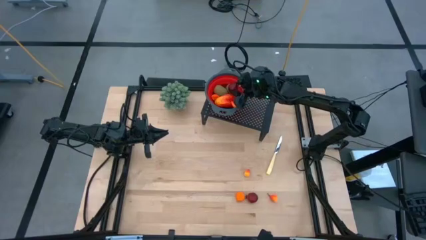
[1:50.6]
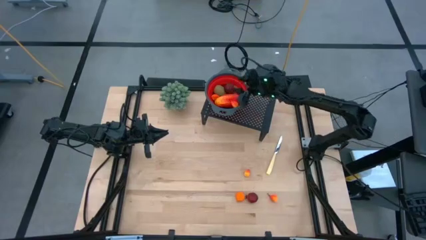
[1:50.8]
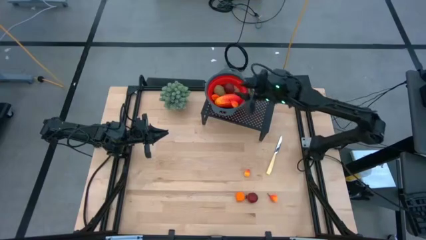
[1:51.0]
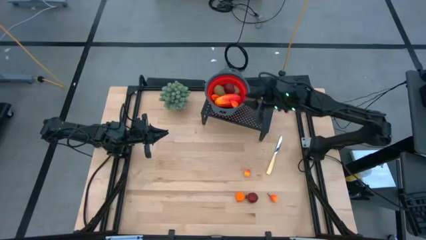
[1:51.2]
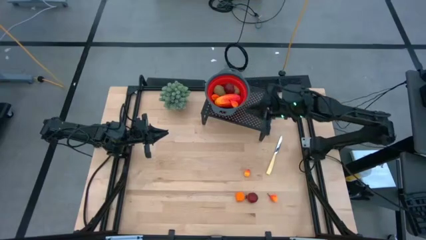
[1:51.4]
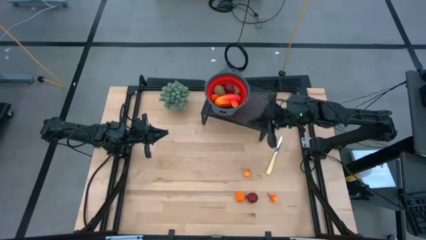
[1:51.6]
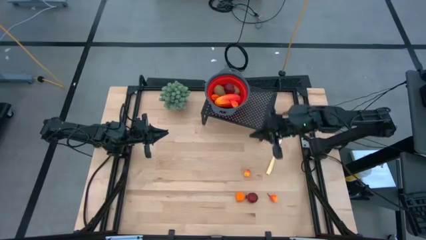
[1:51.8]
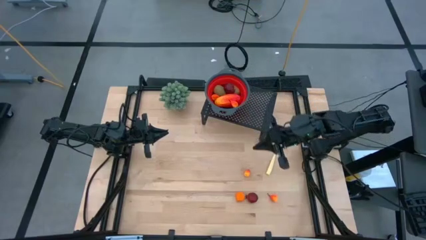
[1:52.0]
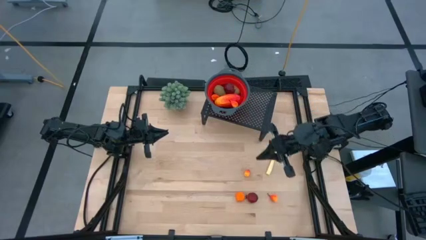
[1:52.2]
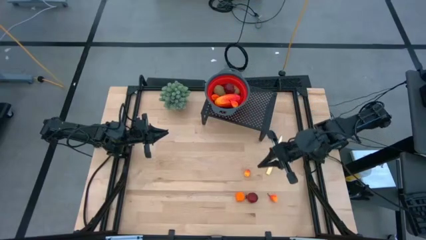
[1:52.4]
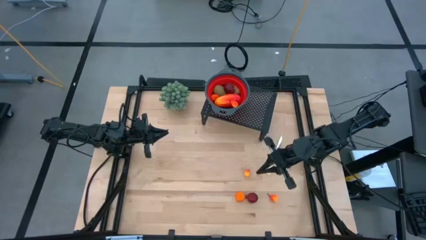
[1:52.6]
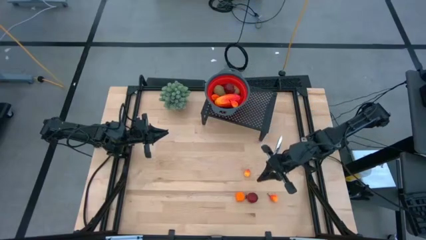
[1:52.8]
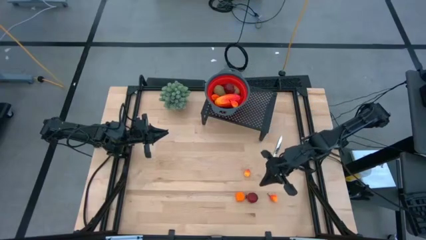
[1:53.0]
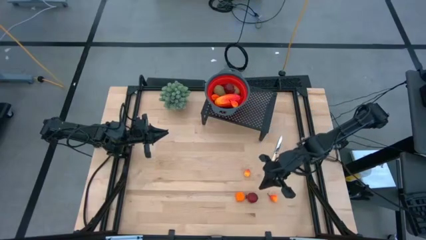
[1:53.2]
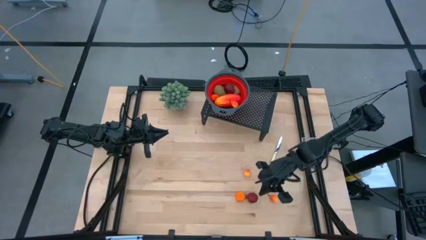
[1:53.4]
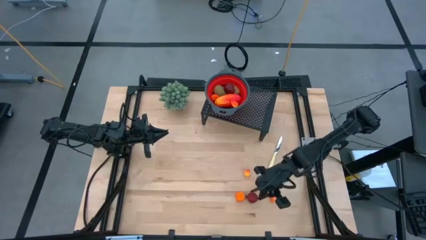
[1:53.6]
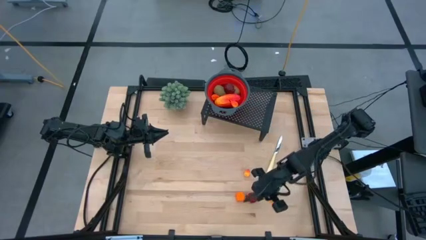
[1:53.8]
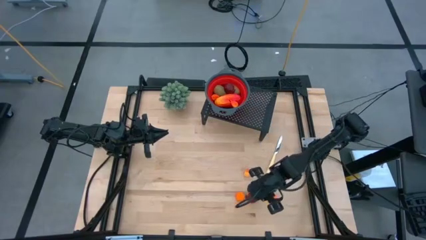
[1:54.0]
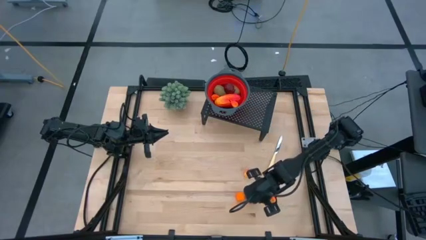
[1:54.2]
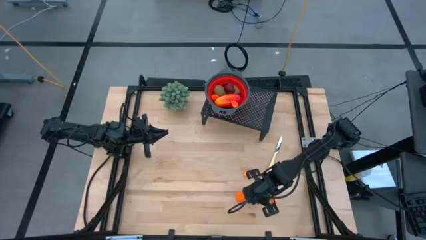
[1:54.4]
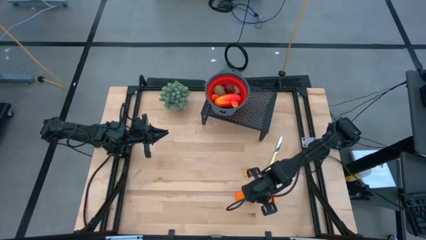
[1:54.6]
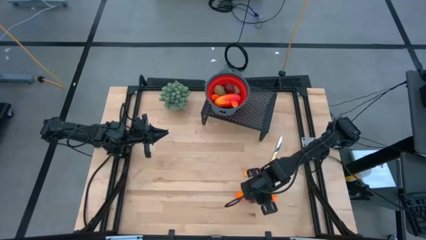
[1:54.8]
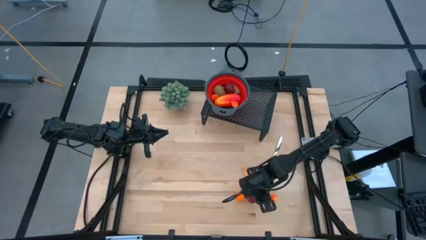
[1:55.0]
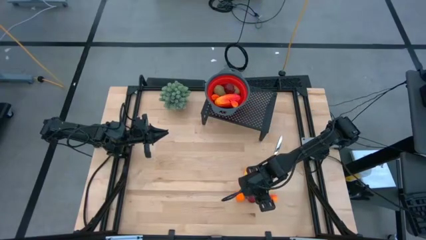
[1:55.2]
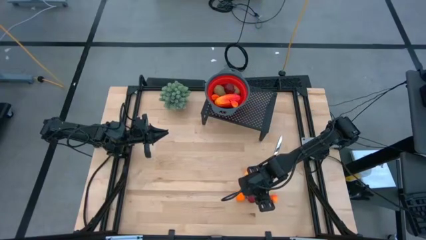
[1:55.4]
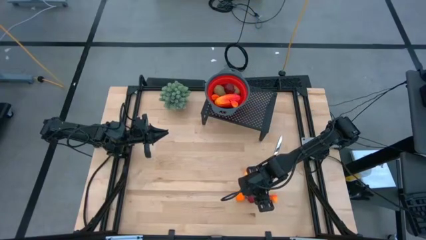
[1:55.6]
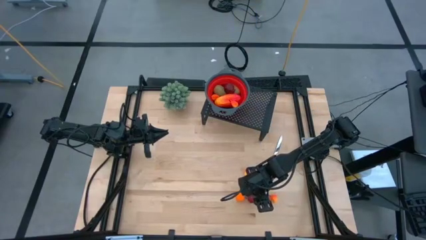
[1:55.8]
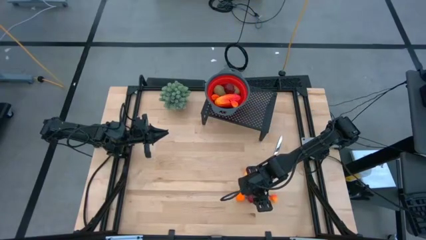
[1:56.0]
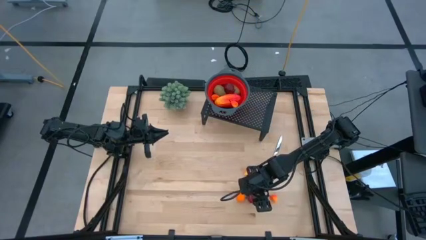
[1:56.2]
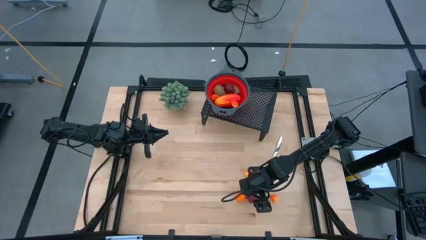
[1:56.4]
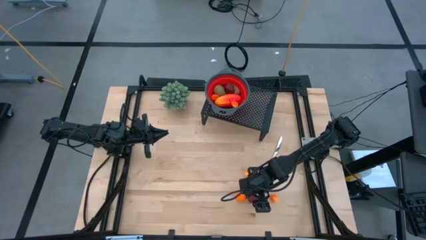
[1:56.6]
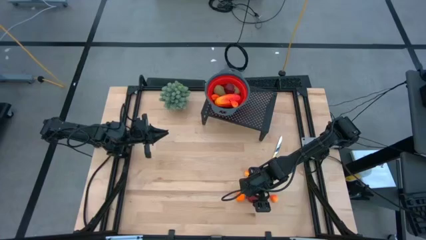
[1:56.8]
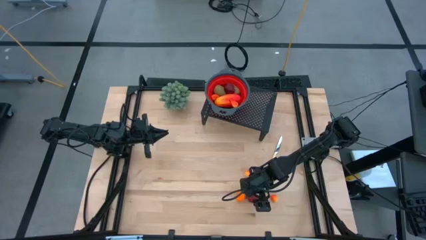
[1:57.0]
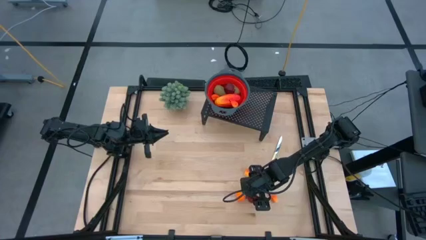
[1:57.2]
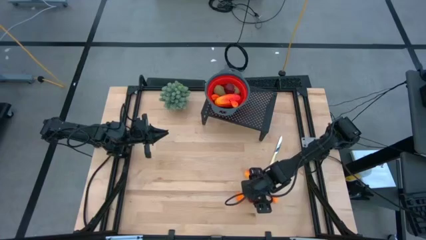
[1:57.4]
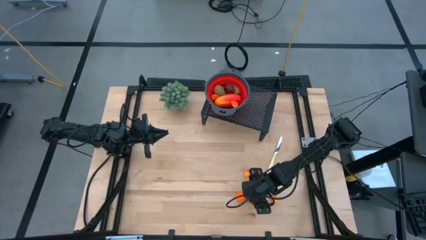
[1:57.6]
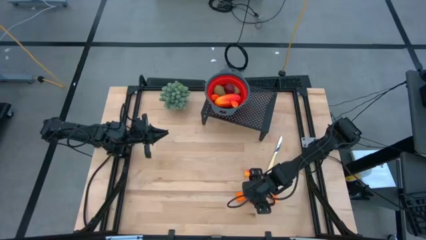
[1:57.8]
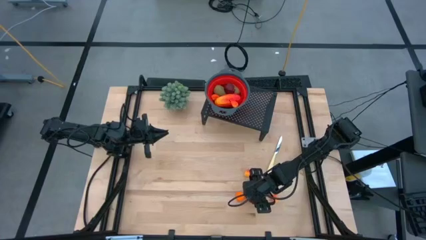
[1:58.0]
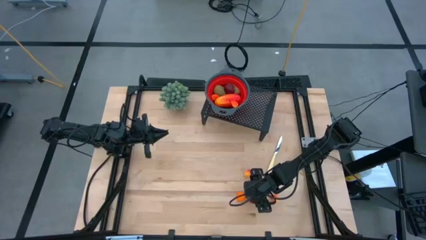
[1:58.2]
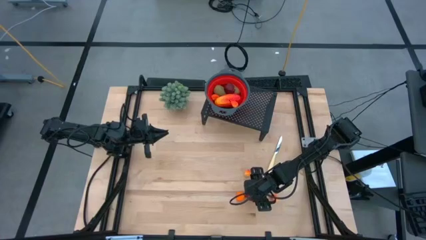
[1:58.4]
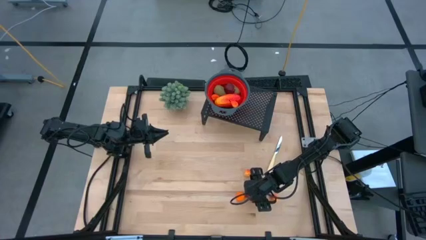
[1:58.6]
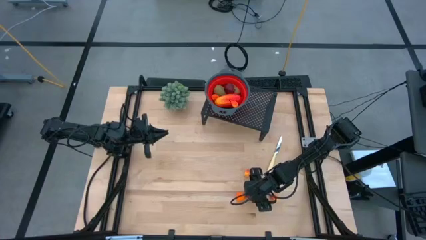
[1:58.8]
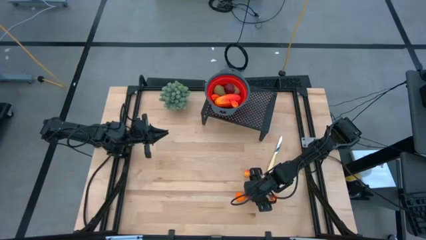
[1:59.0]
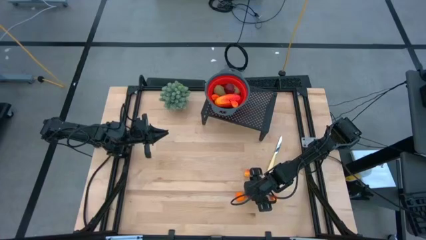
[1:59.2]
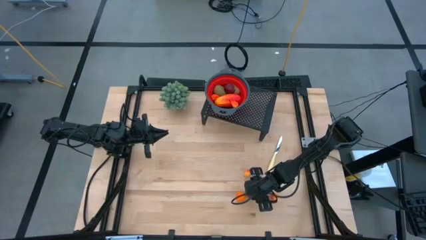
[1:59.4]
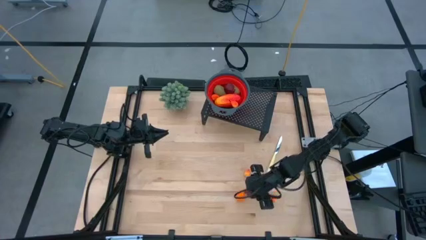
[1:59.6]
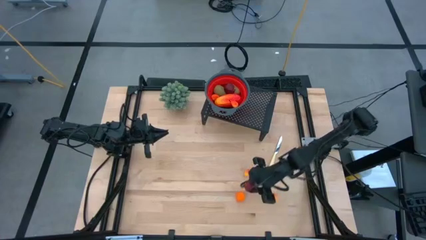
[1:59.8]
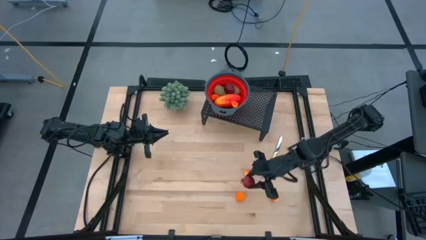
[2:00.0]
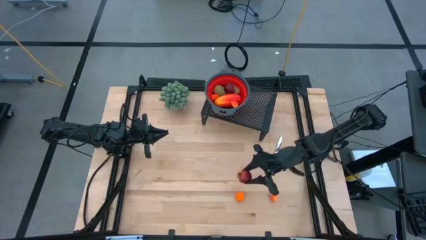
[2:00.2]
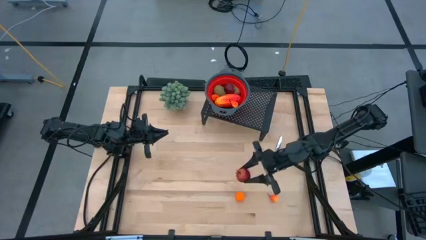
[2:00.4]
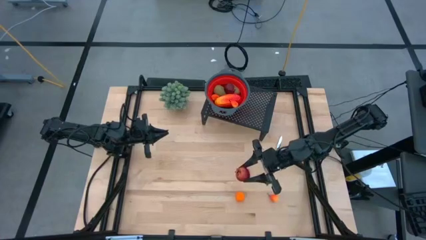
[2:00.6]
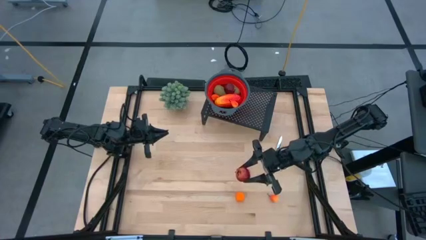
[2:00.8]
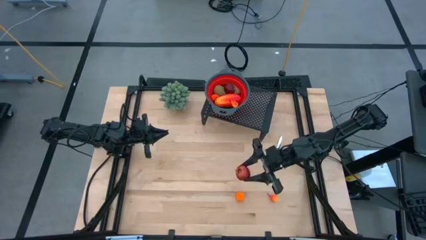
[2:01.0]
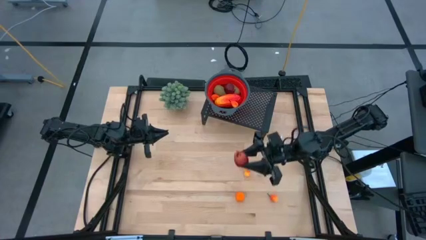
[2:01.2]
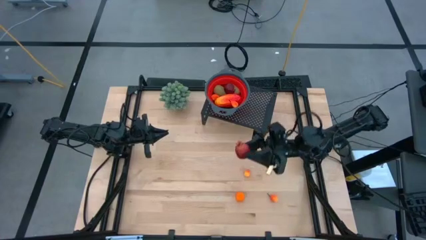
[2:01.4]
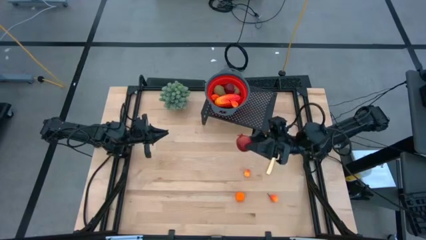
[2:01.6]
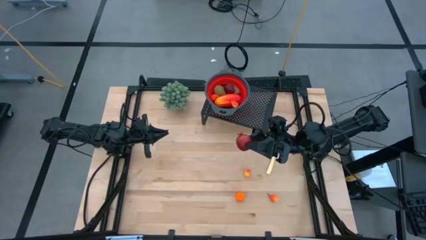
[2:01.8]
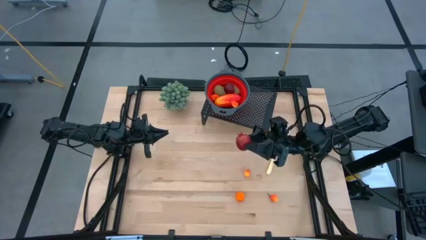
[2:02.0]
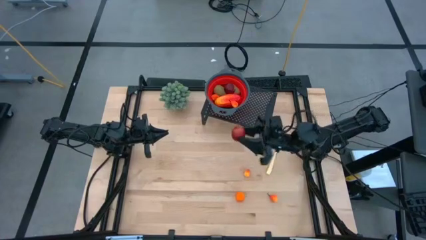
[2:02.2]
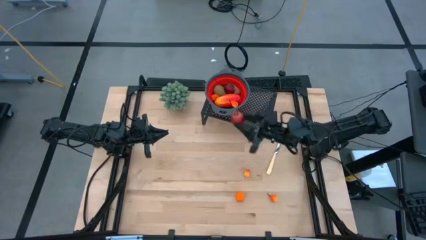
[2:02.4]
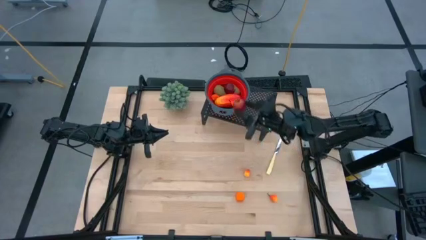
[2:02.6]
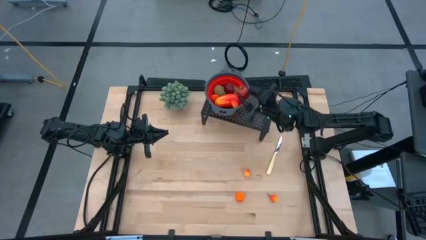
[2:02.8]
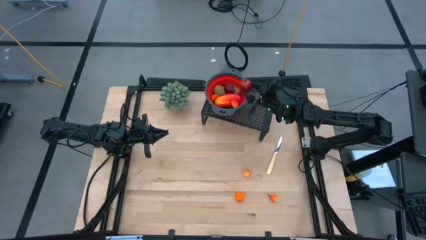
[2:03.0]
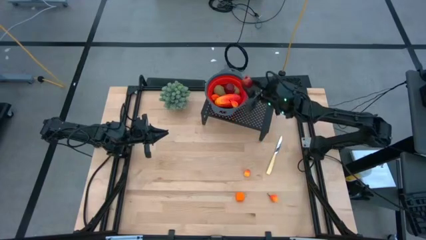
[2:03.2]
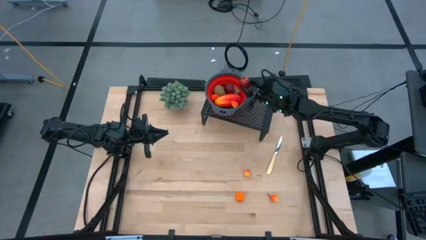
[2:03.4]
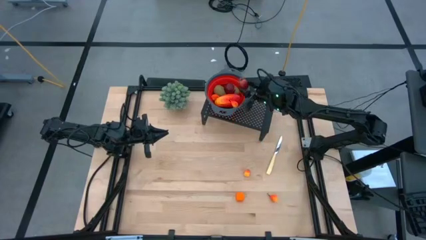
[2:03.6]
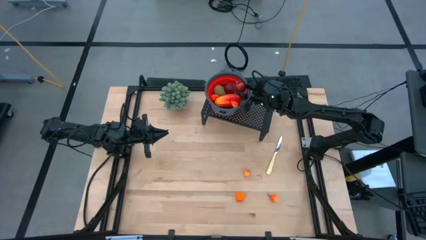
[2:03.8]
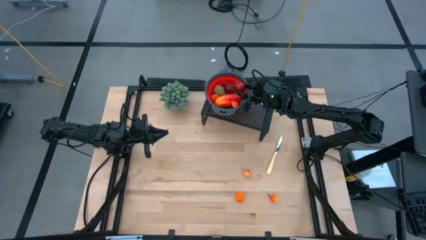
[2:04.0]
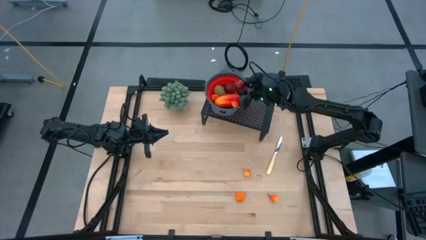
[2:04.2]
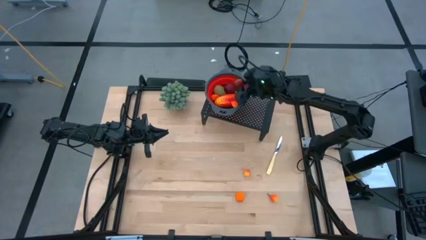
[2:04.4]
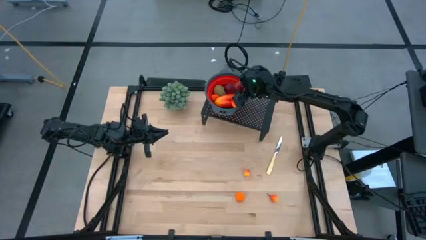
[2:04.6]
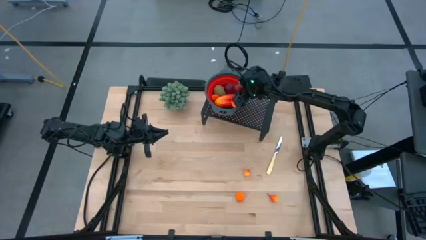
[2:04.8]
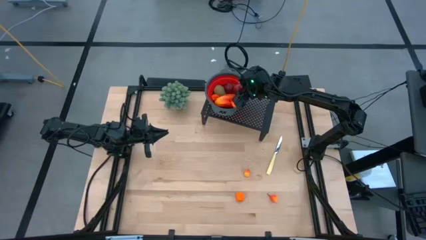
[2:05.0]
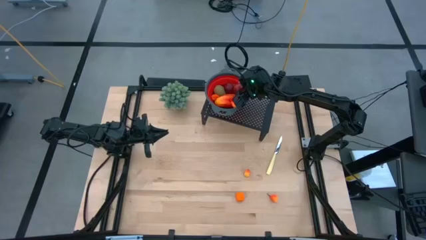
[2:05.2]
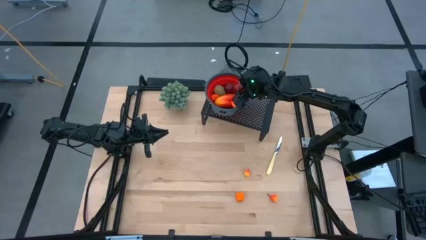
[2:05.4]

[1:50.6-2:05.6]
Task: Pick & Place Fruit
Put the pomegranate into the red strainer bowl
